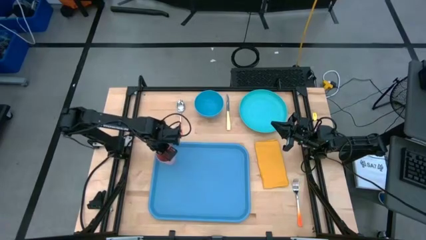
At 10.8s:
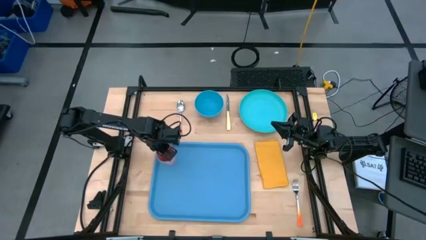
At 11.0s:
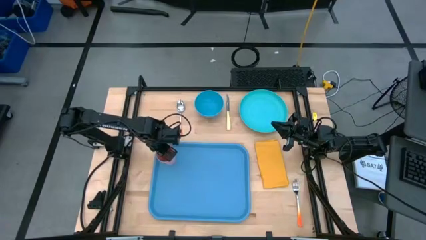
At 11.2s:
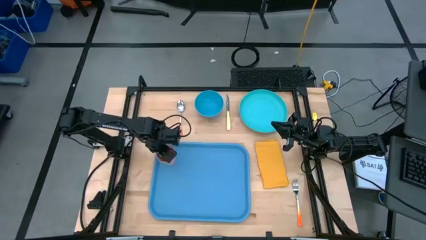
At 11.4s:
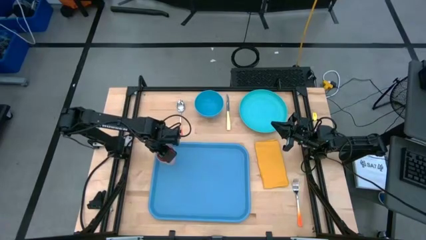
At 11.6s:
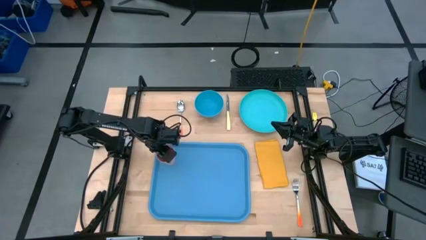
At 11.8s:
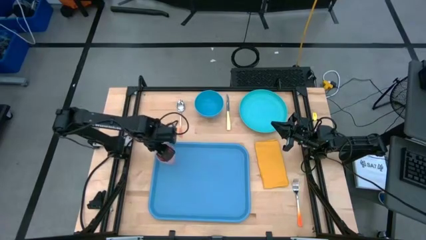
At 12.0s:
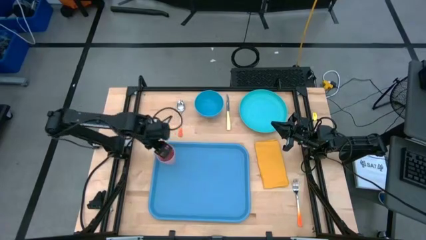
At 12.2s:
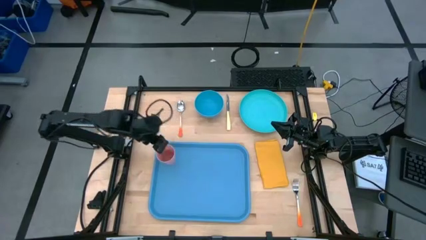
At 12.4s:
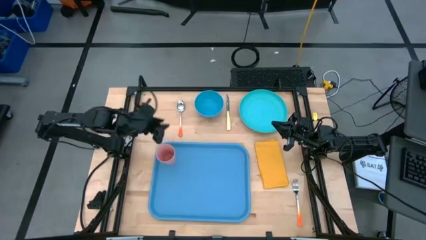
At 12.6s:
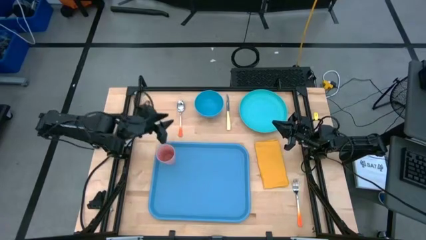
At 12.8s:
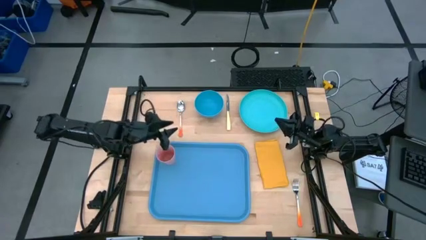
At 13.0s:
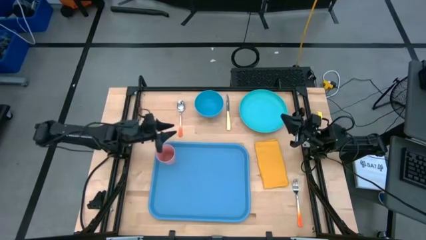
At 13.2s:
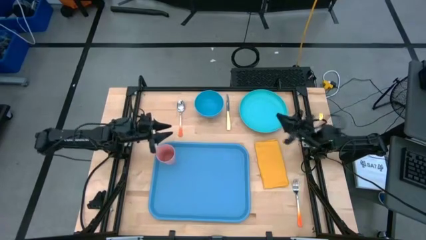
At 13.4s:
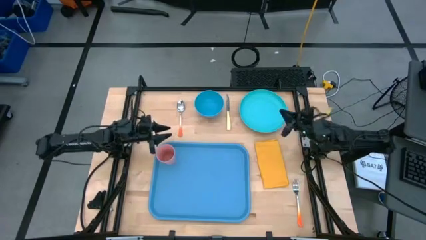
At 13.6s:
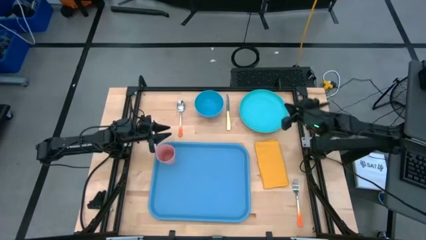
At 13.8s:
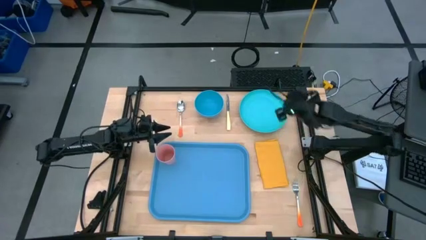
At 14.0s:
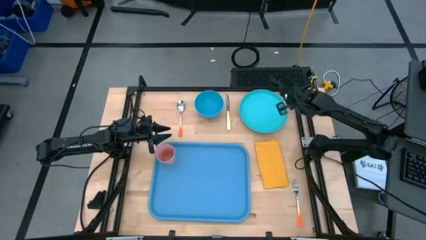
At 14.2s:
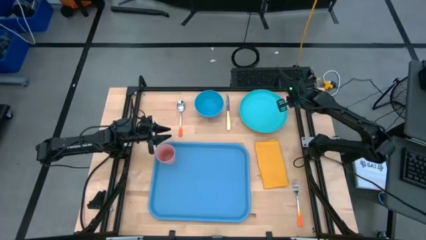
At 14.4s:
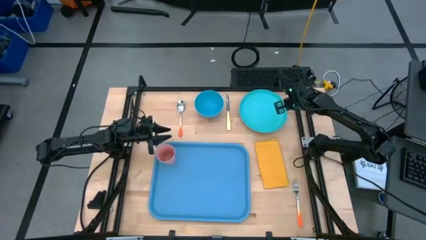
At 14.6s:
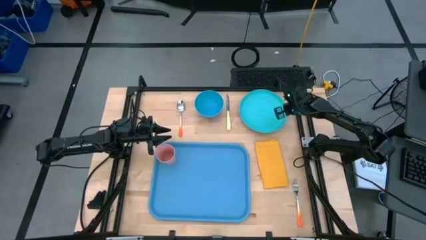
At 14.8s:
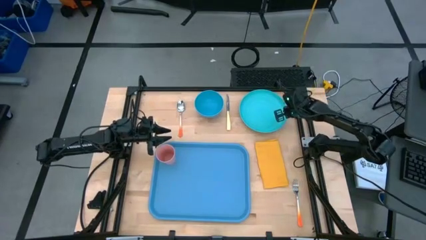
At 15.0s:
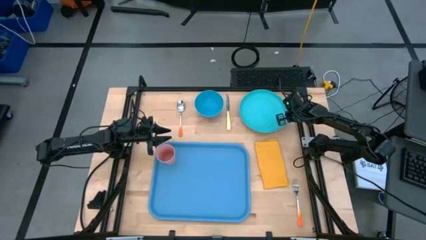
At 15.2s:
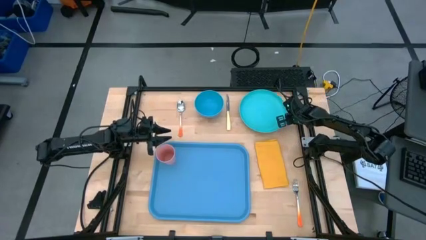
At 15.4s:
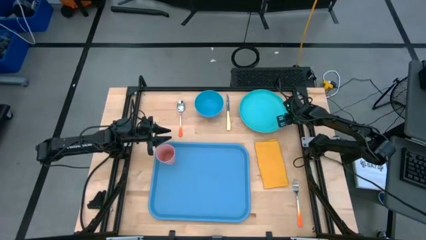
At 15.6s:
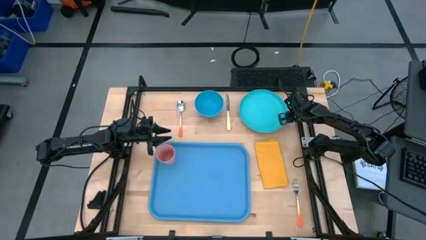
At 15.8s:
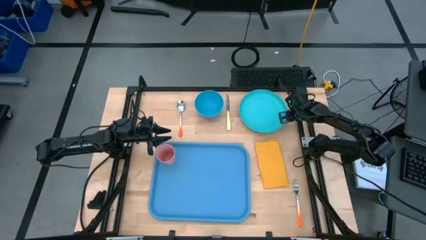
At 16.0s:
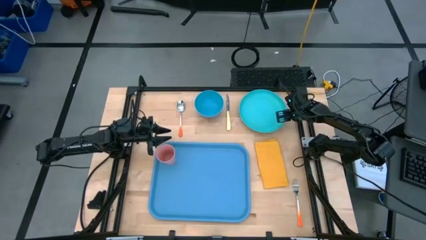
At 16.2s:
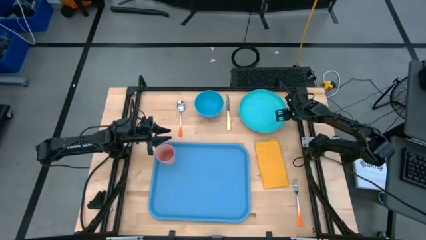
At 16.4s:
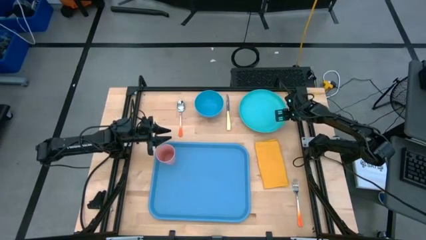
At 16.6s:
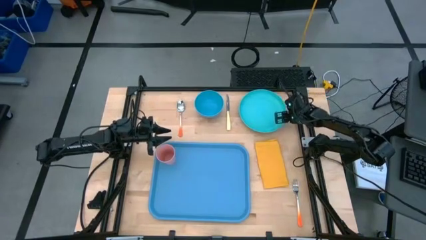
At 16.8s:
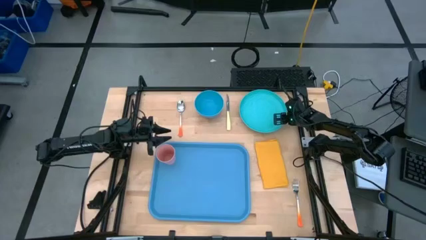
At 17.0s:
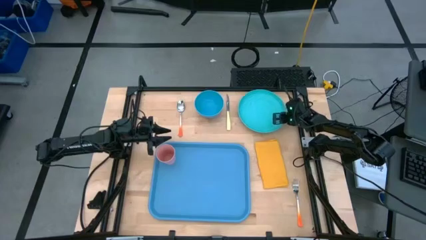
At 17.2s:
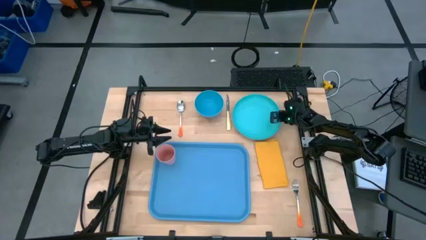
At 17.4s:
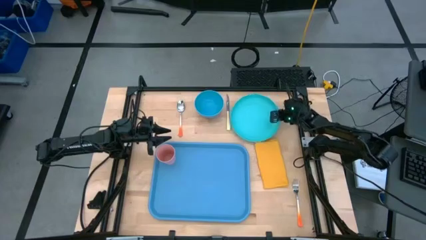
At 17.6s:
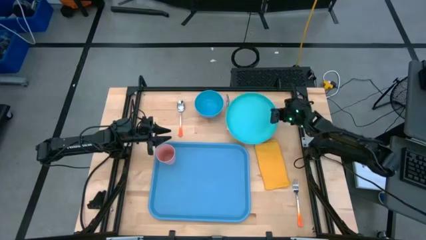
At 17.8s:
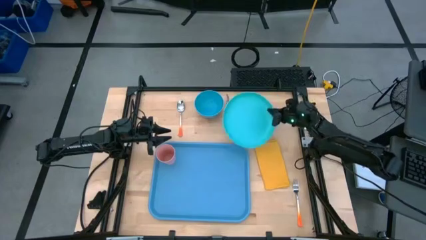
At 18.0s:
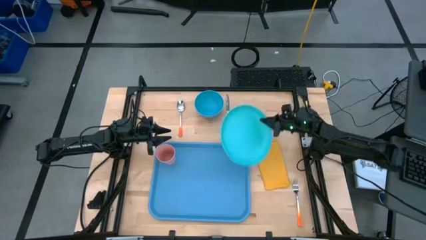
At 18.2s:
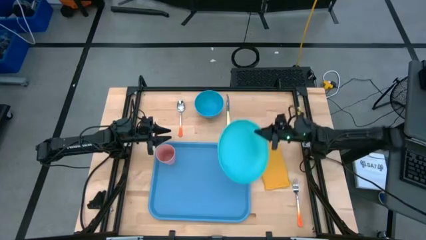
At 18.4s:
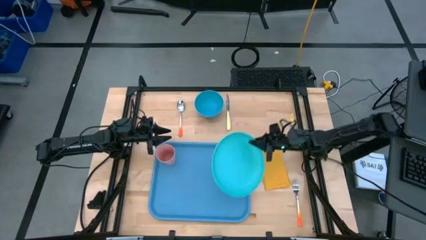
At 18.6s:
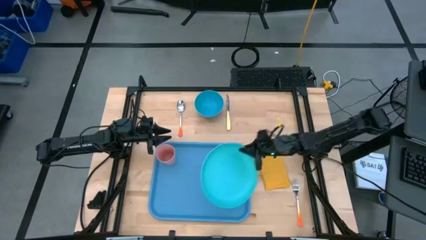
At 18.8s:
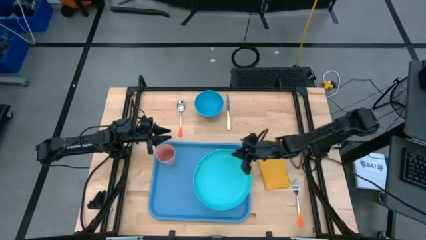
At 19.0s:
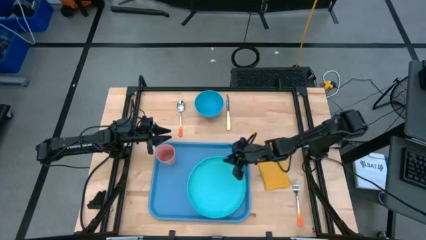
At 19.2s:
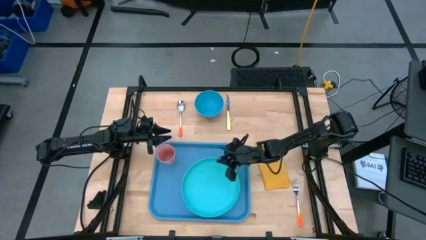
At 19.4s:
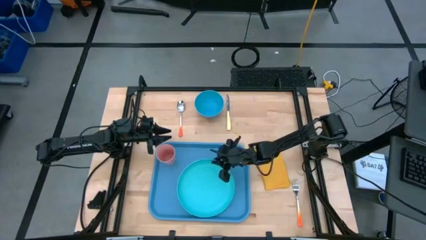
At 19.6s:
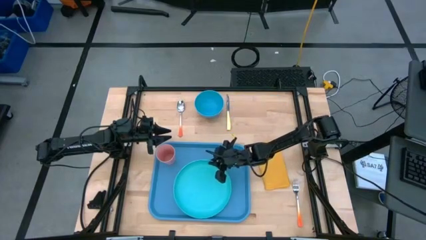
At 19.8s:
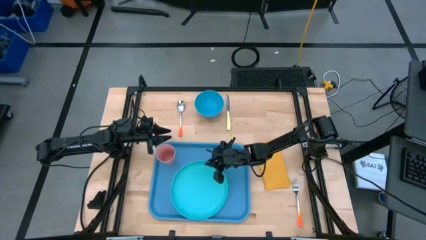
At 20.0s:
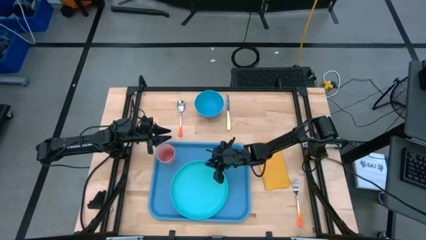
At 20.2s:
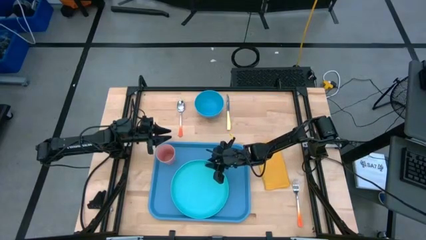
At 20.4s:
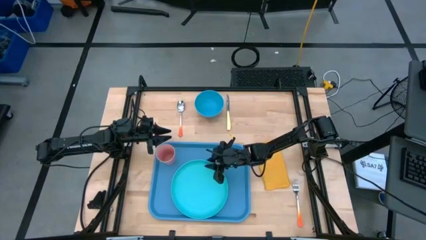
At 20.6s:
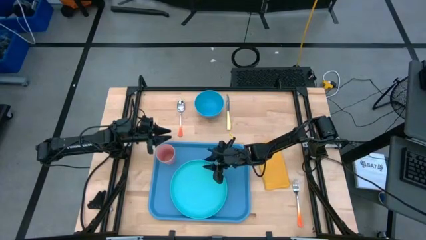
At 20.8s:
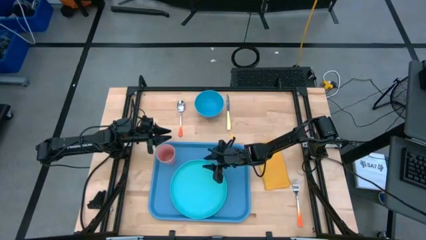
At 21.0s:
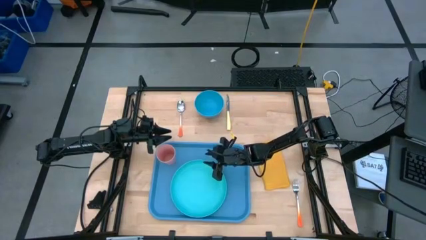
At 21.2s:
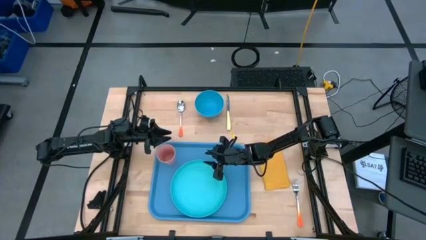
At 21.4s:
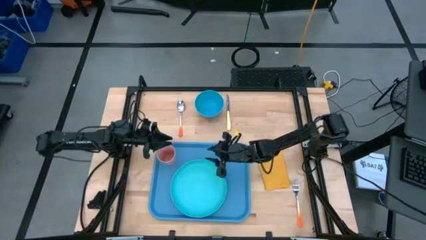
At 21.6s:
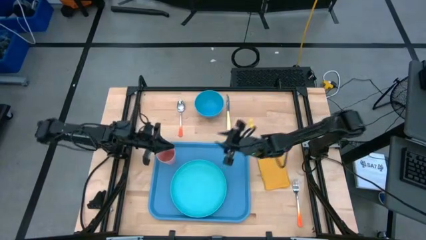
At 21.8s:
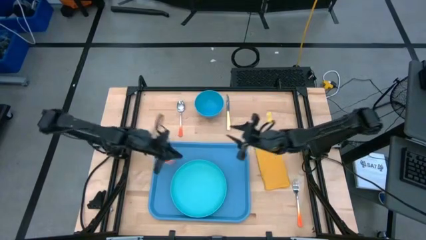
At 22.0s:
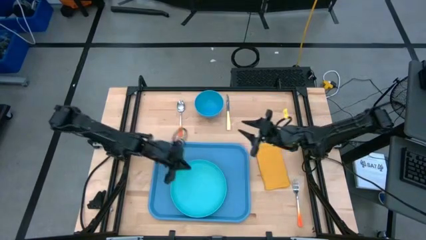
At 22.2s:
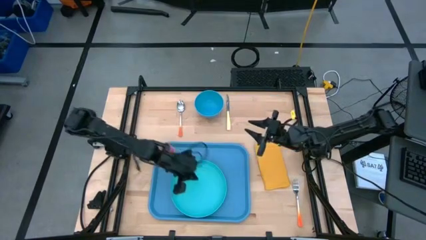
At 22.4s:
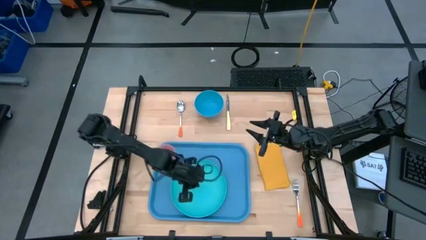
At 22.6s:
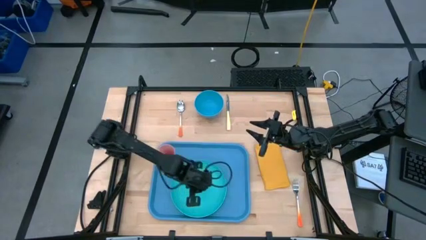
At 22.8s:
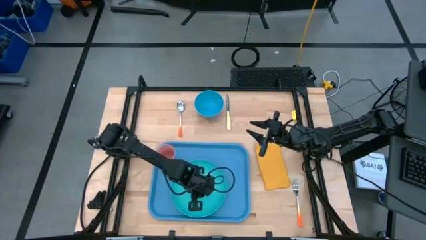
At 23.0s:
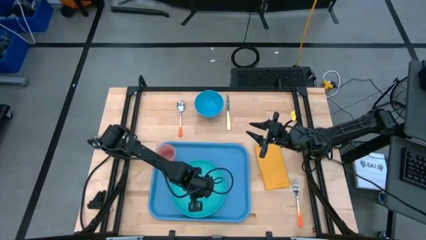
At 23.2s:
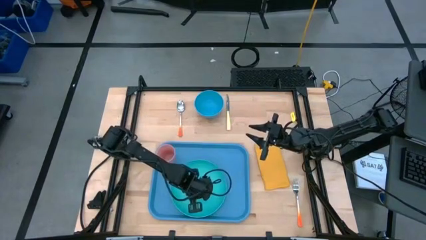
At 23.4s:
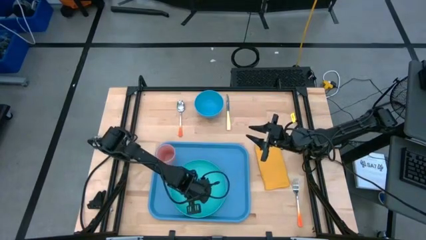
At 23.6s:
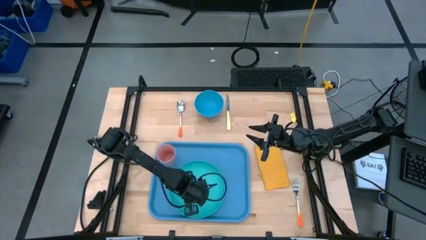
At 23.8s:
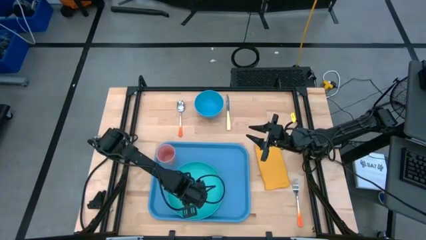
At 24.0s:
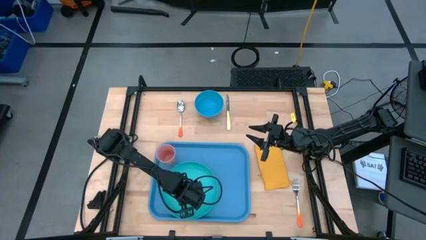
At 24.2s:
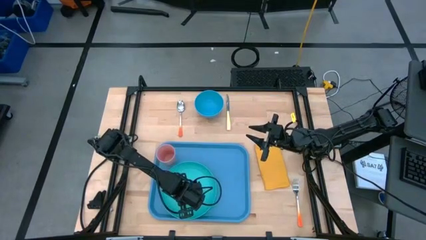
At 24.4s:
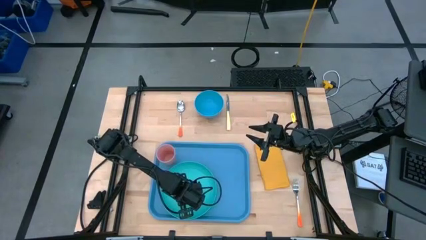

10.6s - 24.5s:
Task: Set up tray
Put the light blue plate on the blue serving tray

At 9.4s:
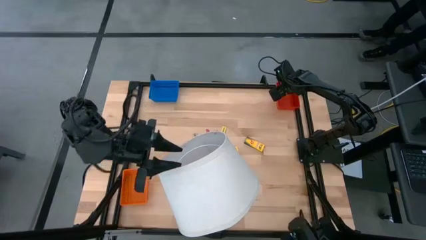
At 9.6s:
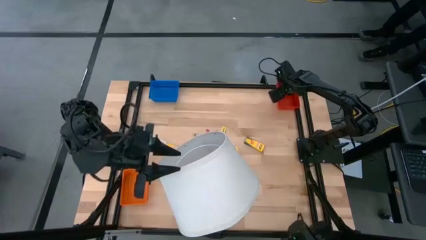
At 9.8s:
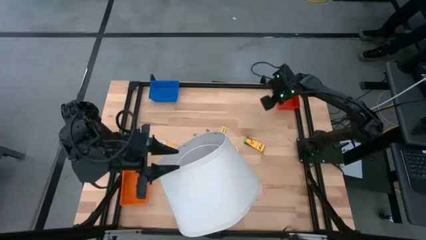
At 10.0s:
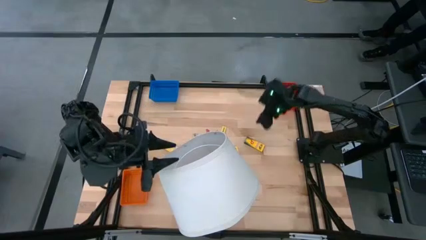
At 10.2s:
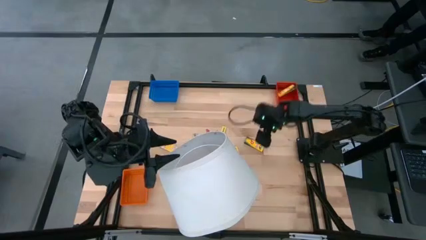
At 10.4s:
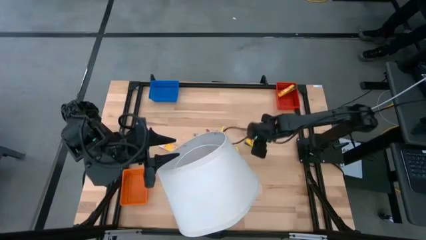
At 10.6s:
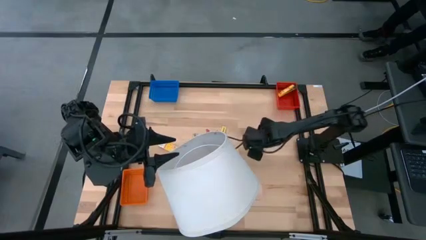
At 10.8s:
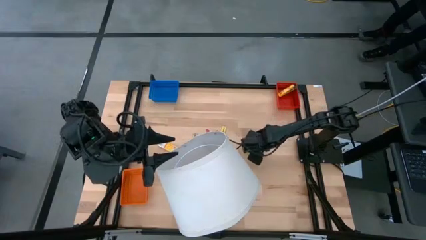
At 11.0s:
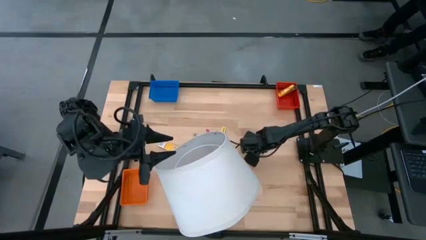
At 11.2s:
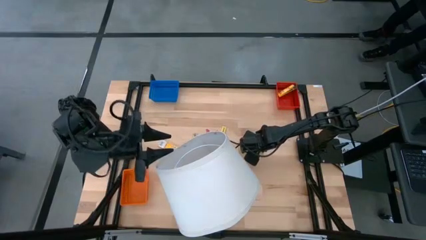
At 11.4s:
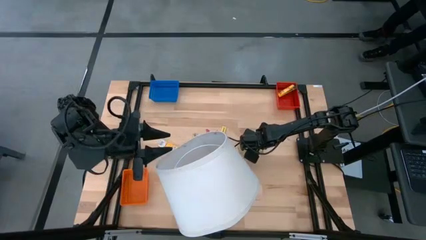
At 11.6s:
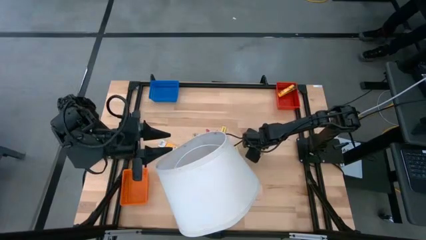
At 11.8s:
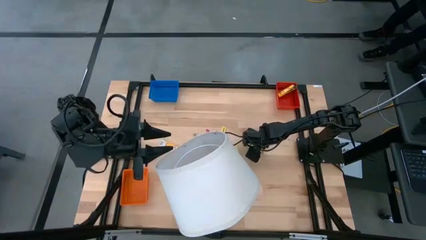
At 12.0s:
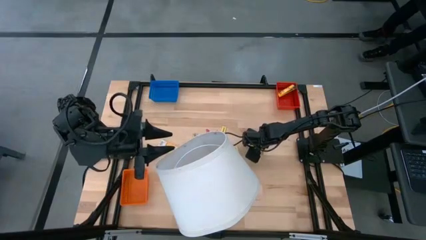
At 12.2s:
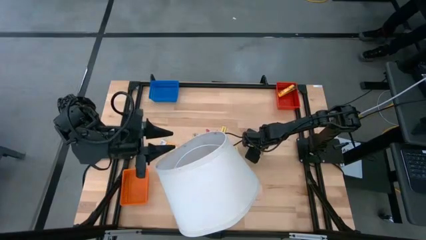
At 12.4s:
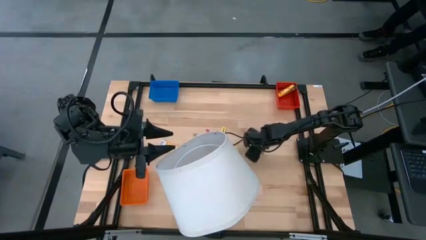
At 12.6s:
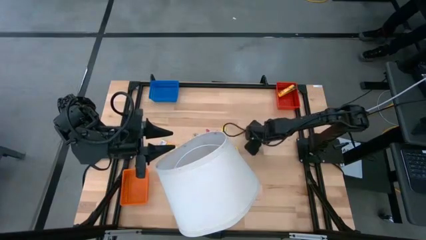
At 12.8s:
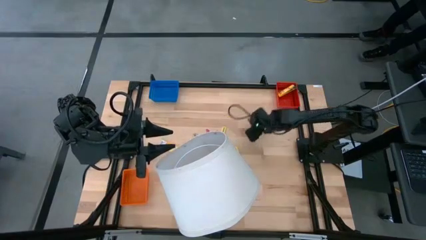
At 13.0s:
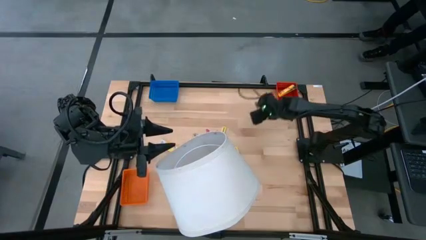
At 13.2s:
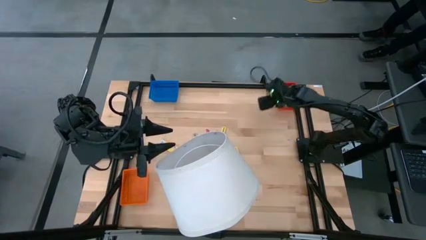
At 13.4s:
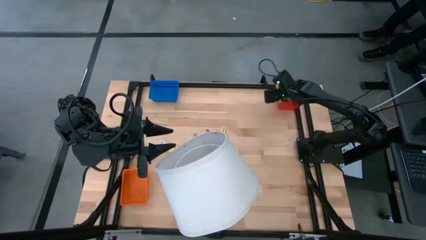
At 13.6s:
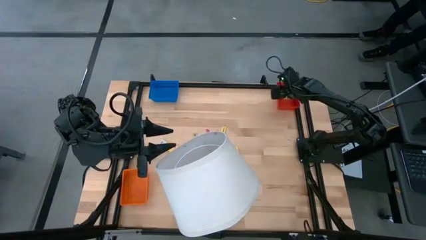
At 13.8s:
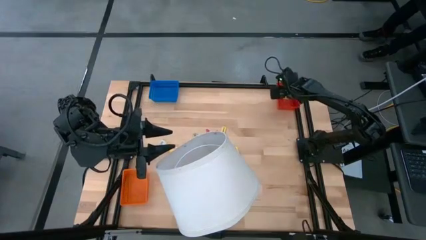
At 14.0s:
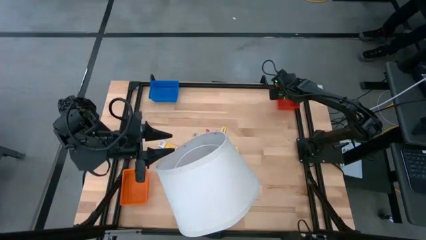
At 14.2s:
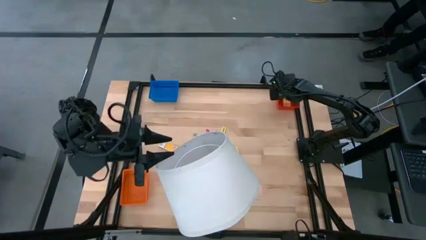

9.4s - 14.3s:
Task: Pick & Place School Supplies
Put the yellow crayon box into the red basket
